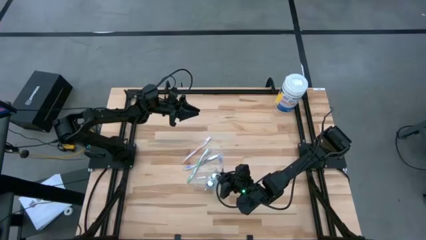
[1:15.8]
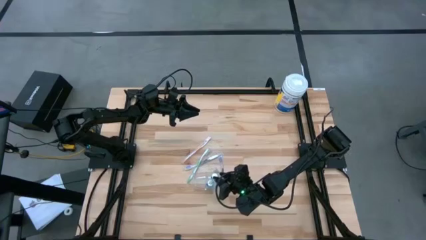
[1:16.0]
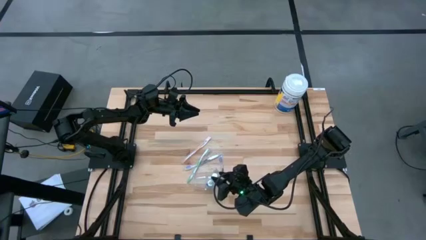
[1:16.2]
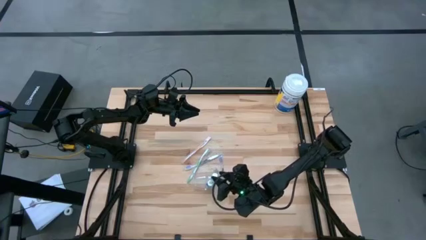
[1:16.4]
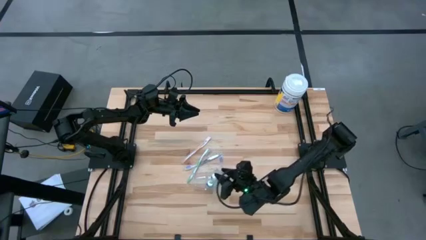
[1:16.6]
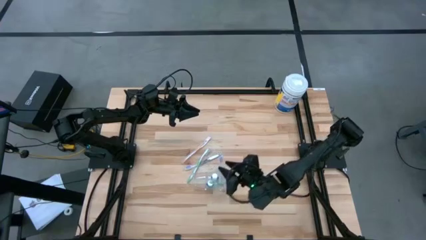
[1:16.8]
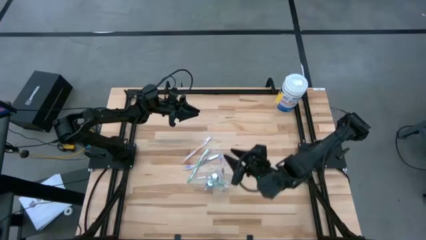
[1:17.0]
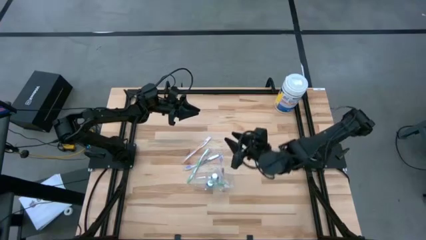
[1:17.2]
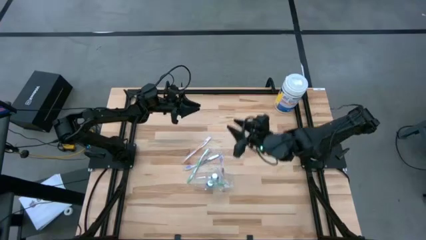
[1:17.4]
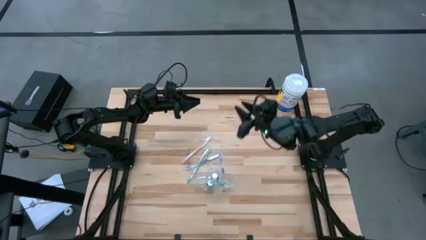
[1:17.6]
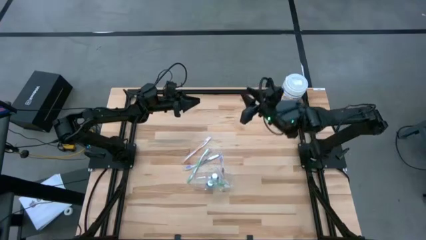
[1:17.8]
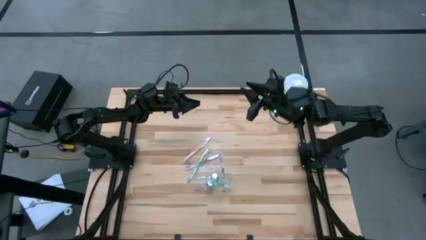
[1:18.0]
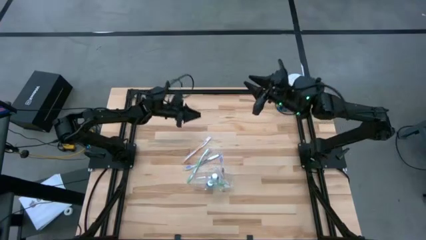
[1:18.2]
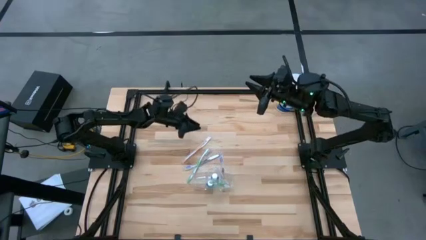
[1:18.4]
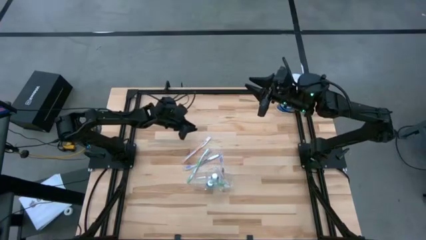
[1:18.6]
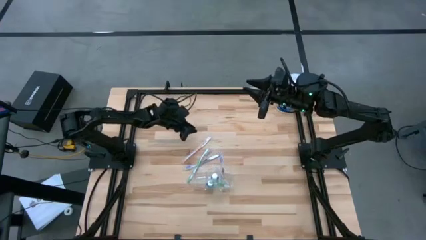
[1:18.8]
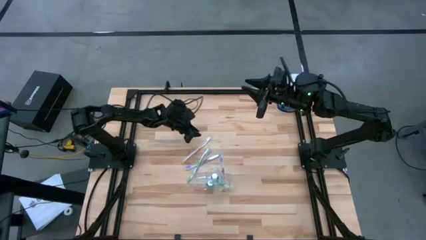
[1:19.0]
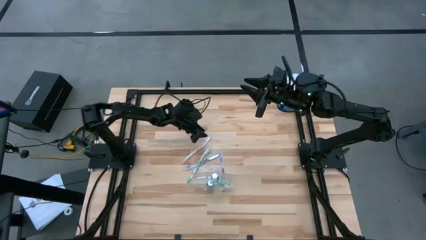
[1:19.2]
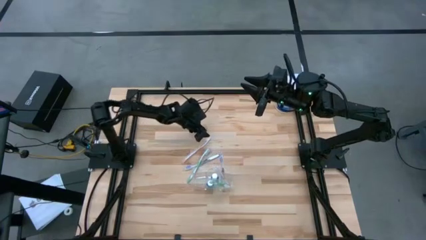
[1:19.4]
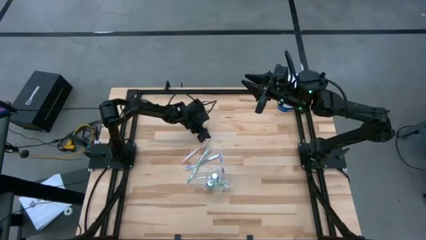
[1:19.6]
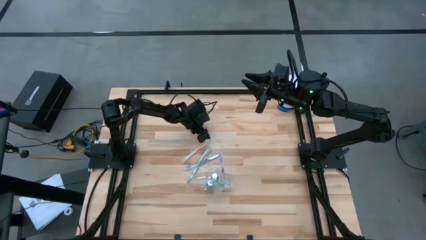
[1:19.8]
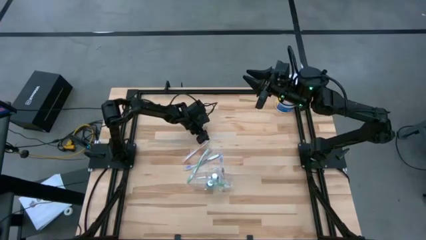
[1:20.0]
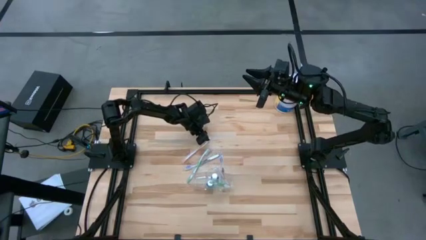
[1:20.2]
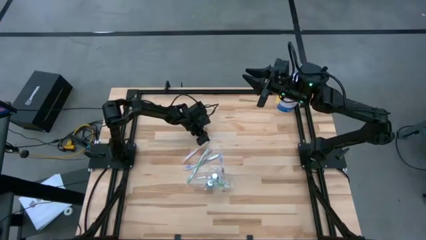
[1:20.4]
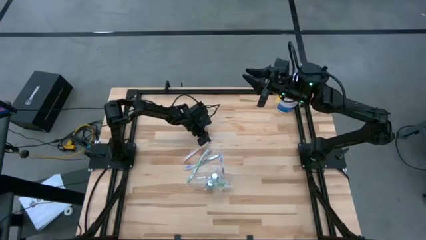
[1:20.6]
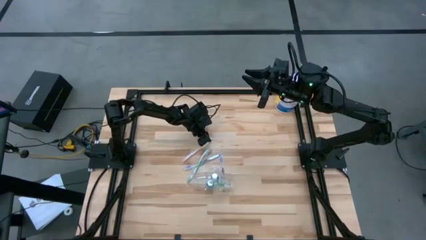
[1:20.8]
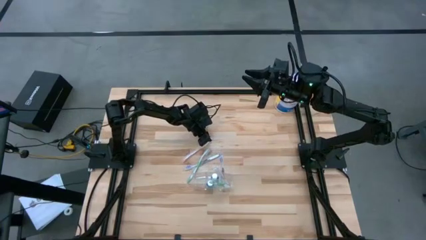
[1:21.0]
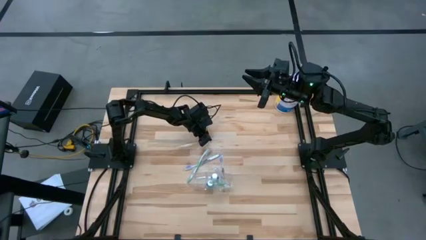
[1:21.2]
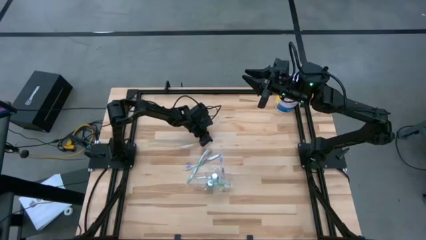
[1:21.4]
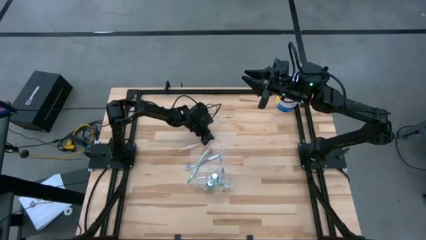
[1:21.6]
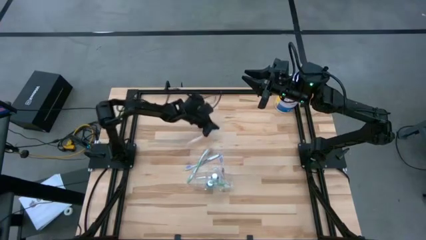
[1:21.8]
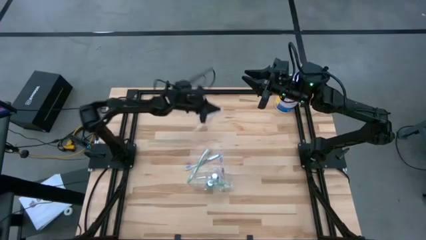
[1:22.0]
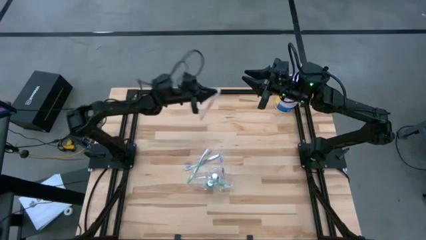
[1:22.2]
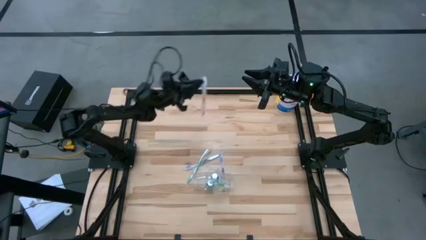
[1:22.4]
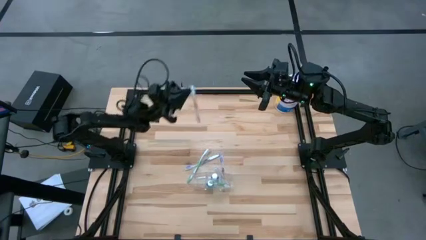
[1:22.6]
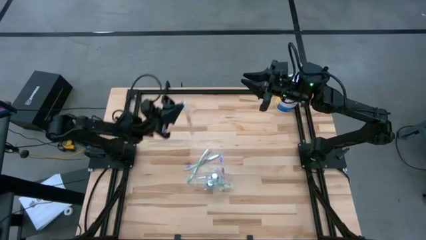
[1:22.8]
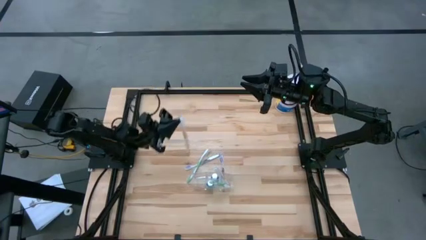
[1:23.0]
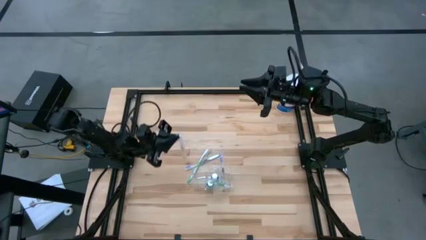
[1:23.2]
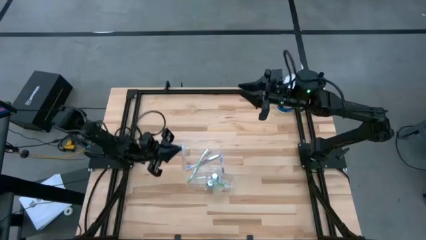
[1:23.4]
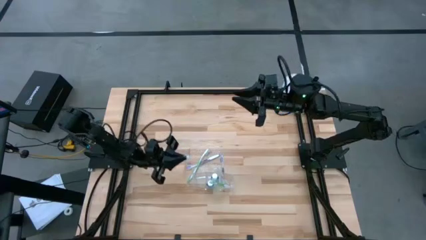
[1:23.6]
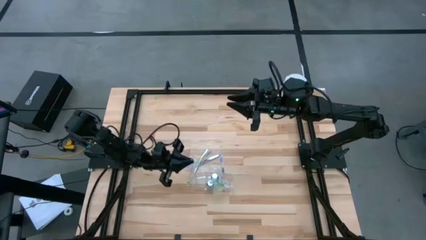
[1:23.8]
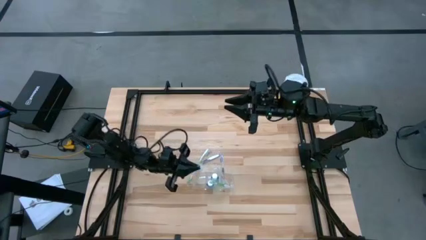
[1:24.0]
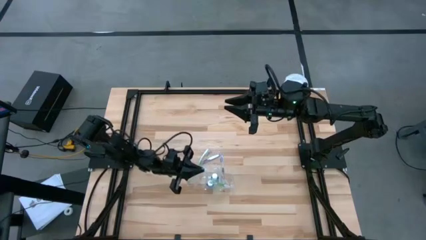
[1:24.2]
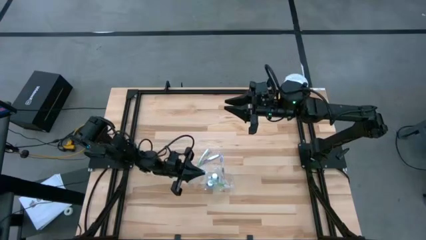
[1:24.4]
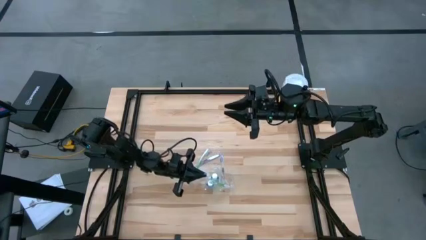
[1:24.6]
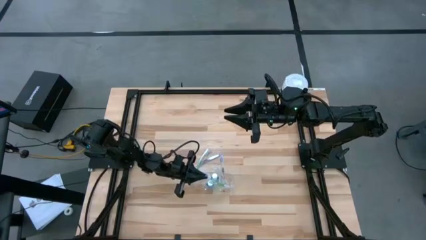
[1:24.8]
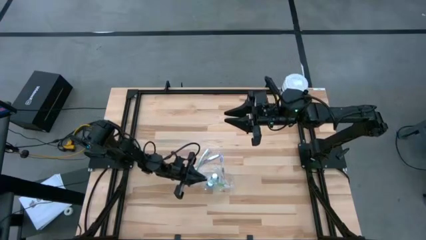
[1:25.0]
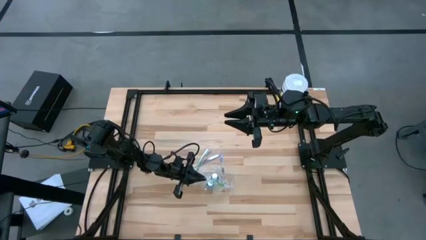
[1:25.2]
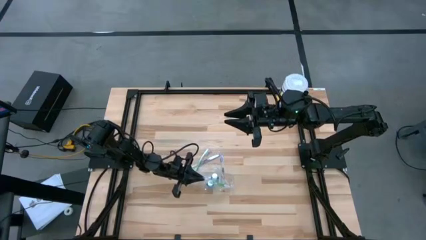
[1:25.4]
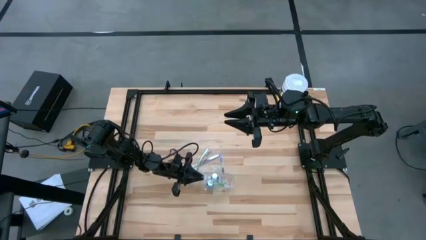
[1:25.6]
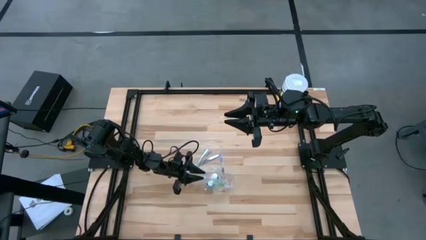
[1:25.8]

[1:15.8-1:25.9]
Task: Pick & Place toothbrushing station
Put the orange toothbrush into the center transparent organizer

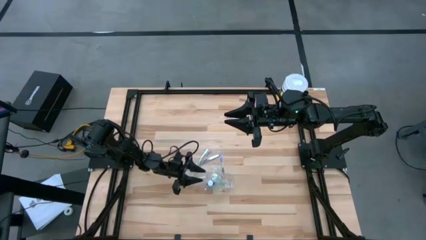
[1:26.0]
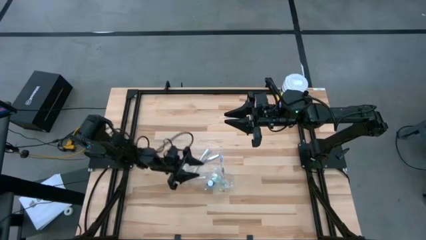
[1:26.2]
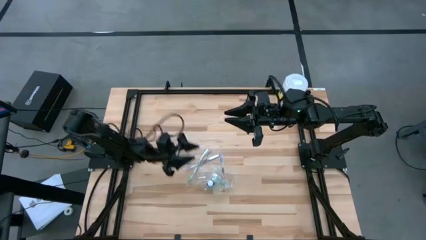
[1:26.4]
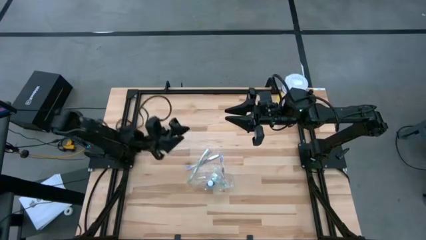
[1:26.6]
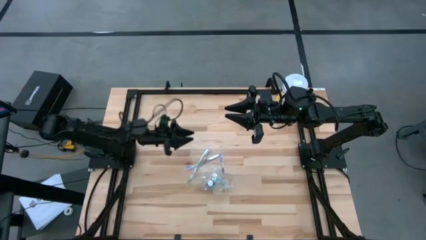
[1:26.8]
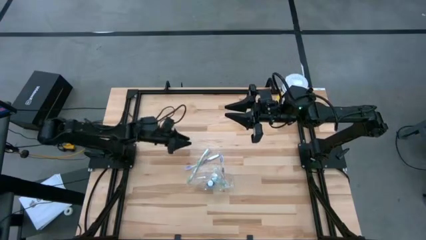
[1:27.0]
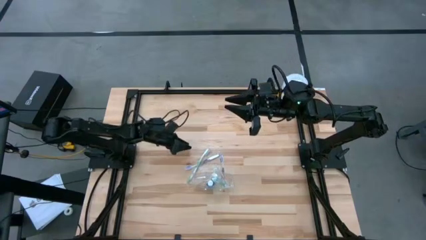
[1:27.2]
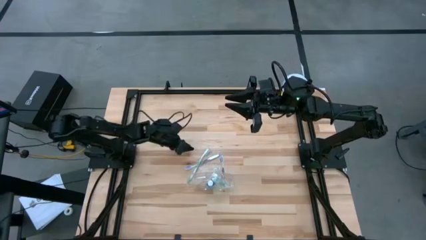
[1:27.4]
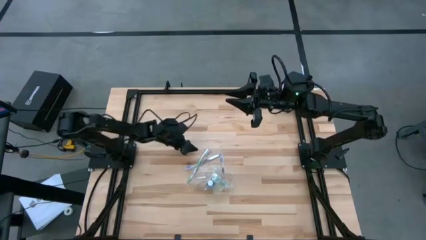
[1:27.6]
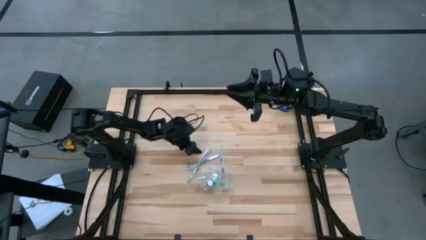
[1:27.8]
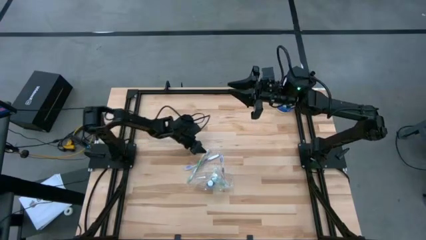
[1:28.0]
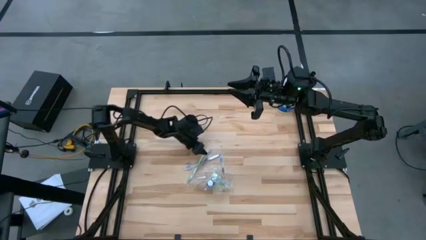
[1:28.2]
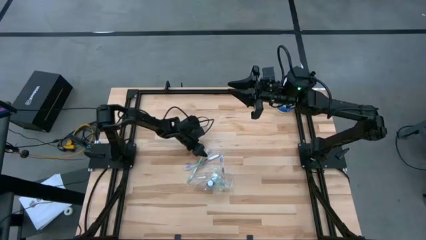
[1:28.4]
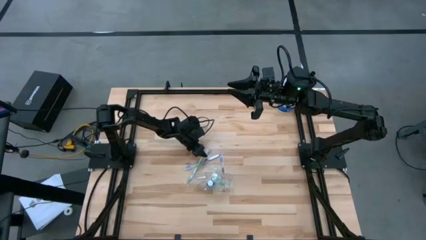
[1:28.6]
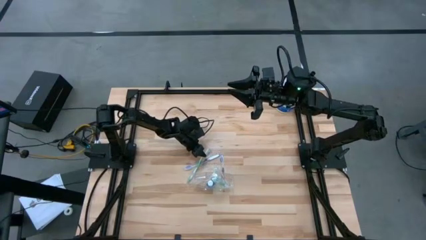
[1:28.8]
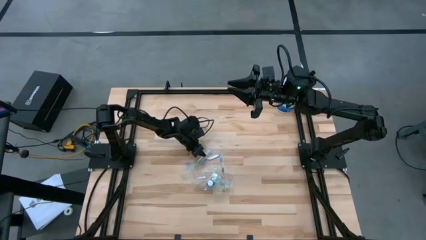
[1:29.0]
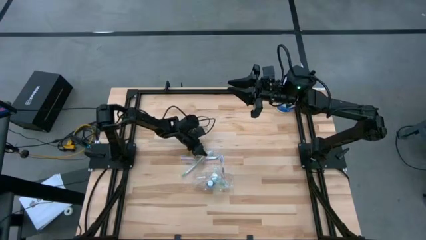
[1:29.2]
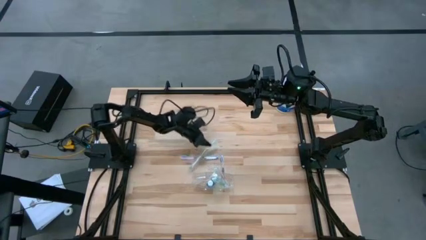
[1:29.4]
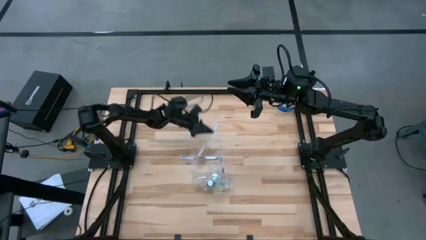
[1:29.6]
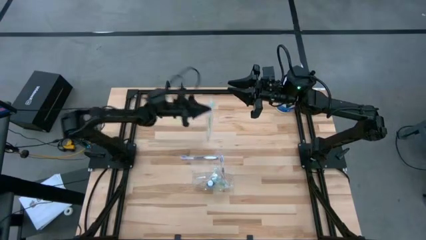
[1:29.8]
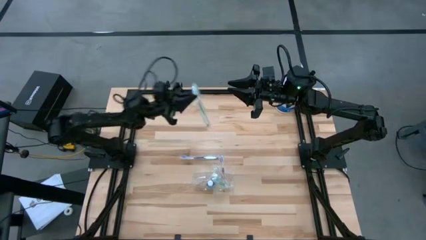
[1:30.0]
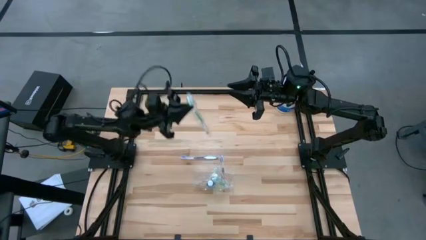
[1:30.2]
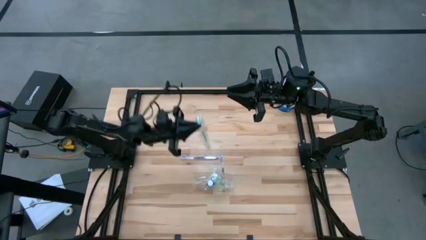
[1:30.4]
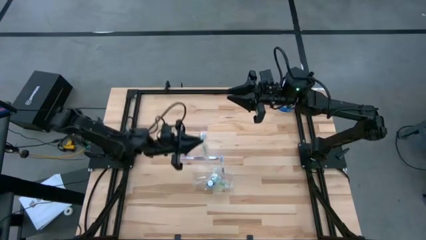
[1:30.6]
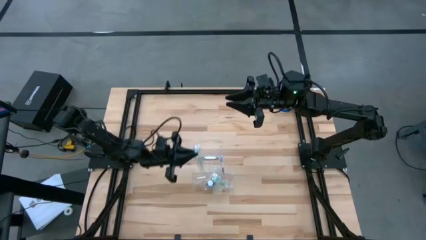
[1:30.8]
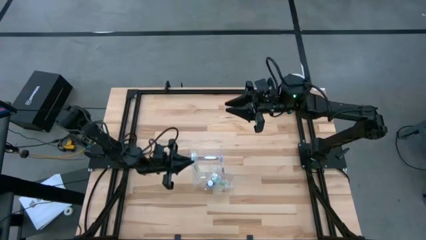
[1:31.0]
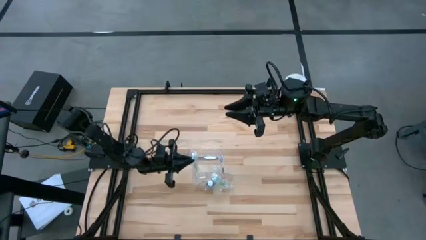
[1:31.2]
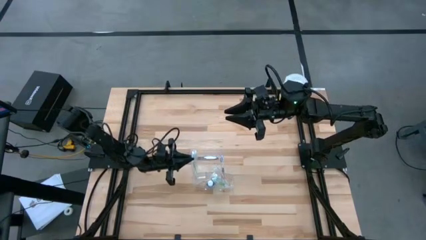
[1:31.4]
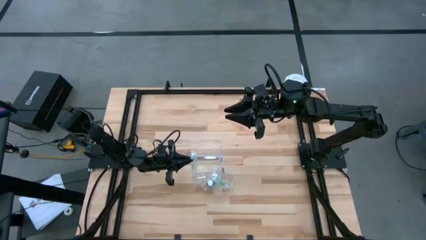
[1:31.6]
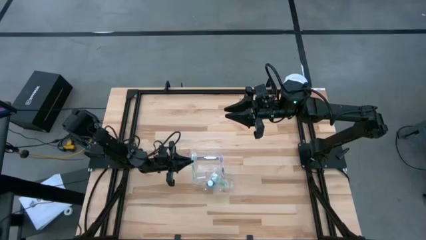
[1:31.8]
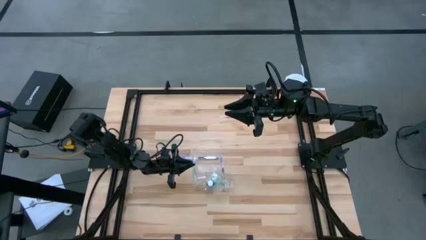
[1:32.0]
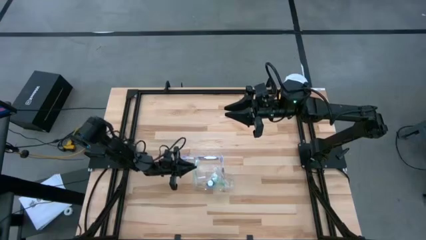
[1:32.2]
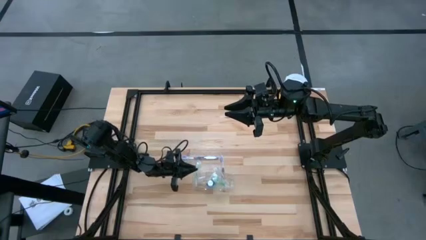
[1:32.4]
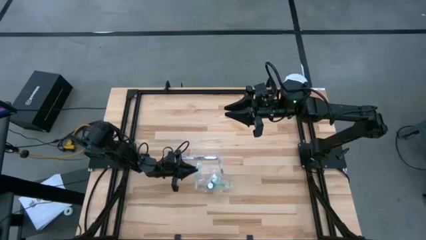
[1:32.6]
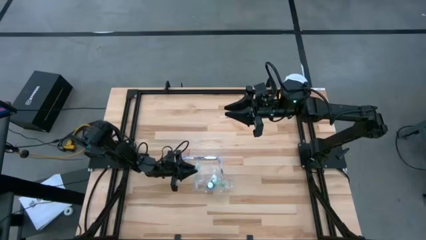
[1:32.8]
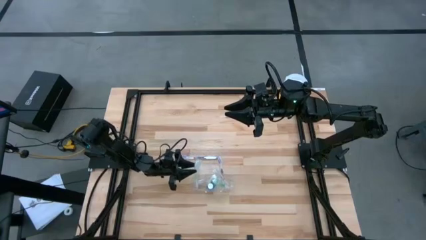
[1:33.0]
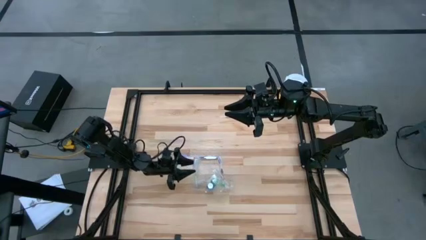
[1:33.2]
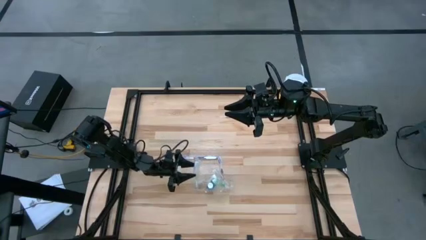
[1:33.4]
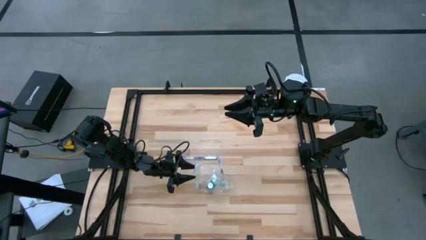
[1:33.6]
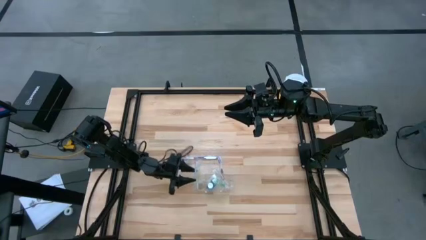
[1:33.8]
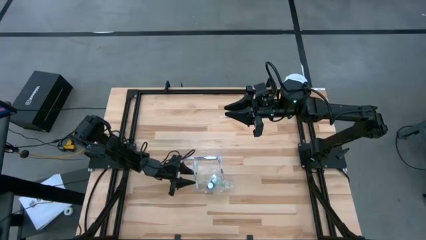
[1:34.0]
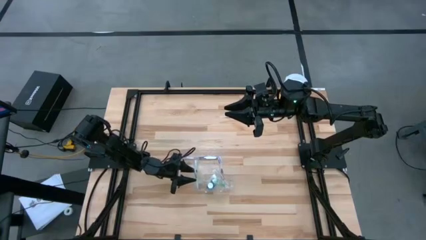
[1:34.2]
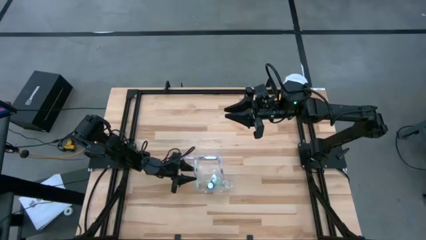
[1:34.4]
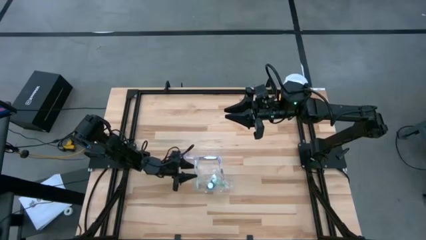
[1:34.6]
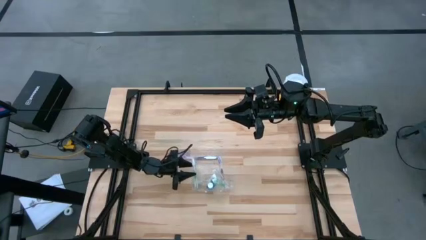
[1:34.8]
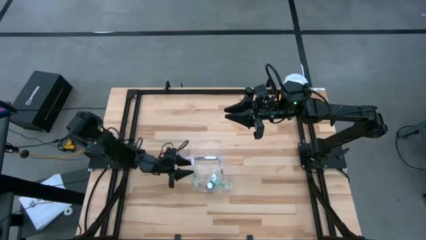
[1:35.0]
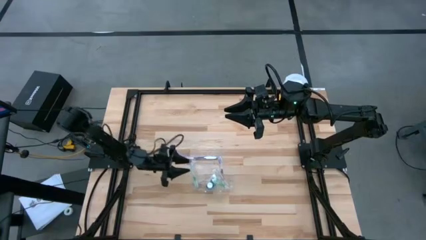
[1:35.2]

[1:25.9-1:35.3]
Put the green toothbrush into the center transparent organizer
